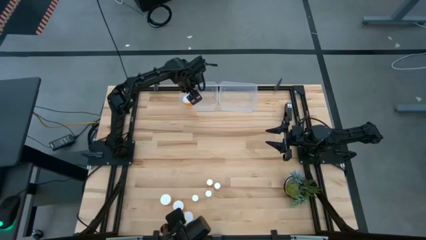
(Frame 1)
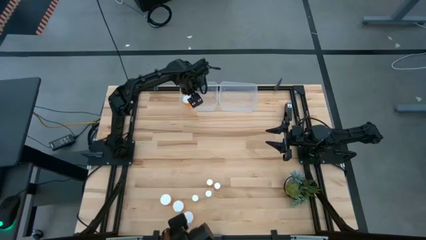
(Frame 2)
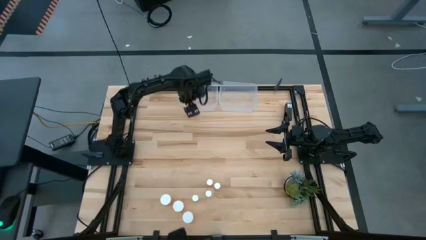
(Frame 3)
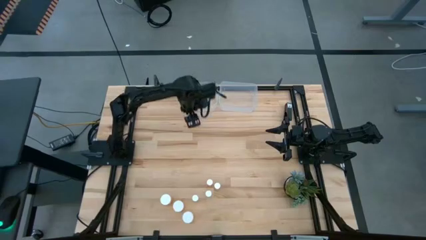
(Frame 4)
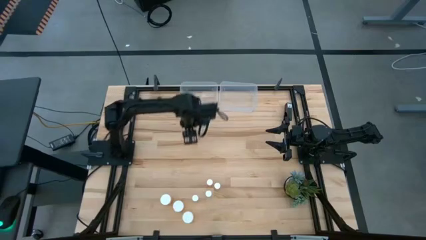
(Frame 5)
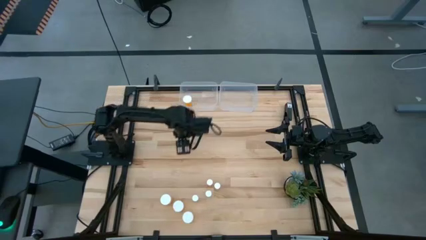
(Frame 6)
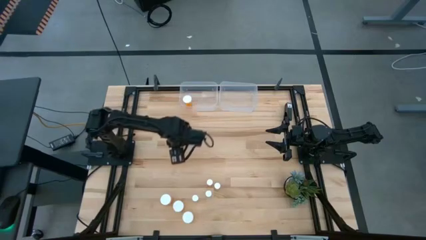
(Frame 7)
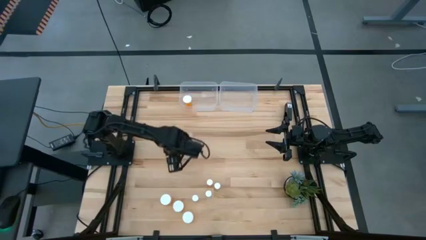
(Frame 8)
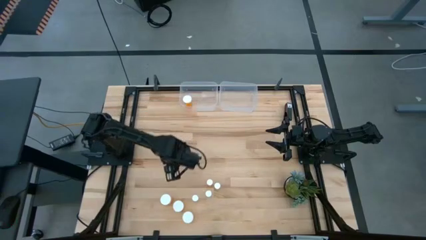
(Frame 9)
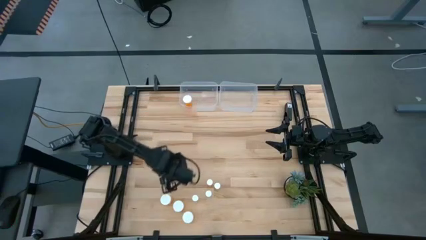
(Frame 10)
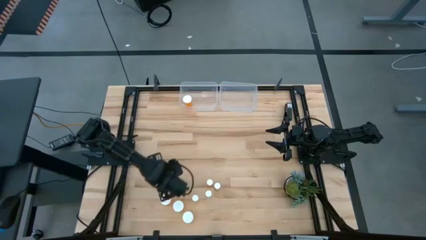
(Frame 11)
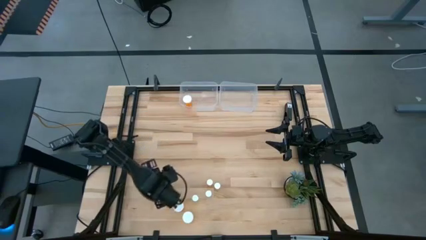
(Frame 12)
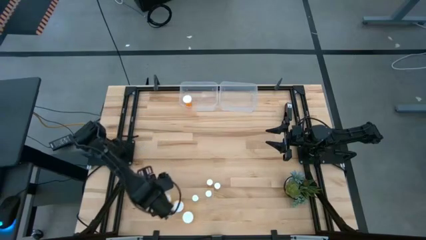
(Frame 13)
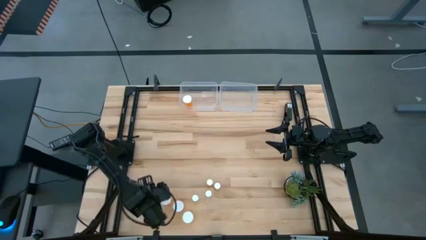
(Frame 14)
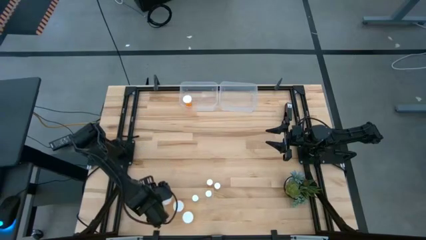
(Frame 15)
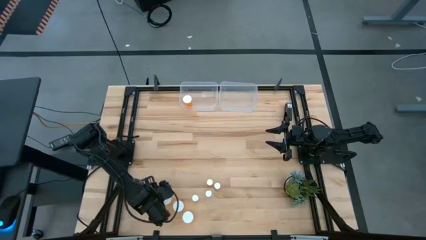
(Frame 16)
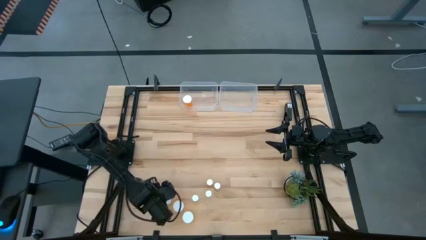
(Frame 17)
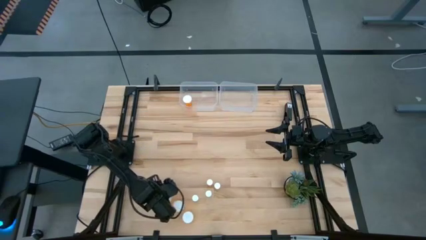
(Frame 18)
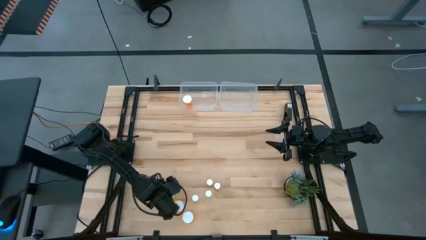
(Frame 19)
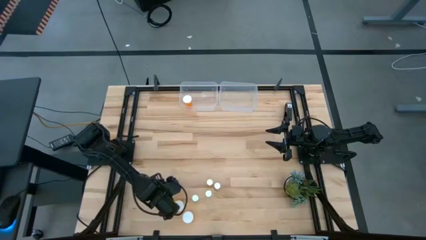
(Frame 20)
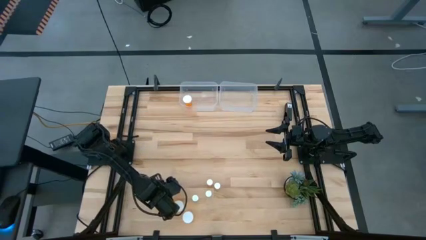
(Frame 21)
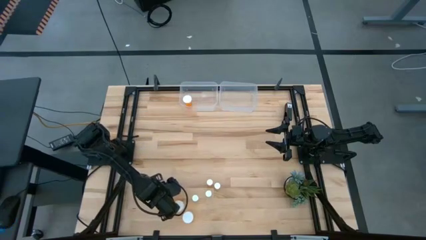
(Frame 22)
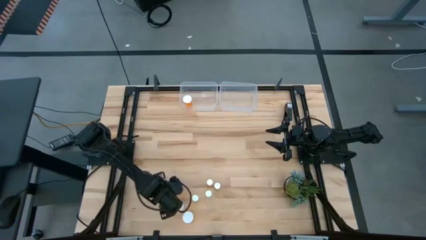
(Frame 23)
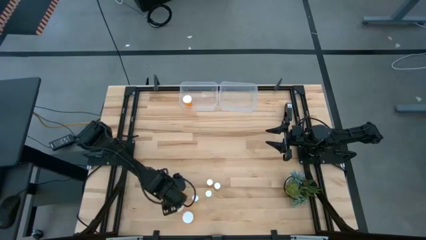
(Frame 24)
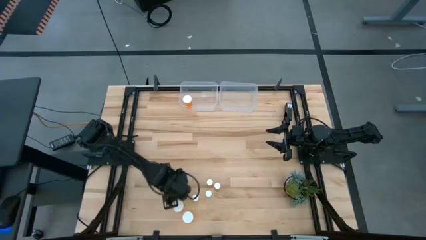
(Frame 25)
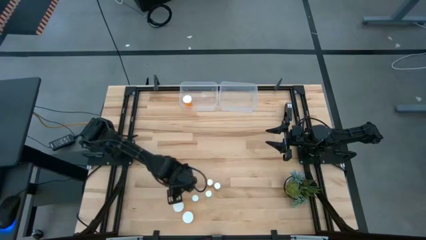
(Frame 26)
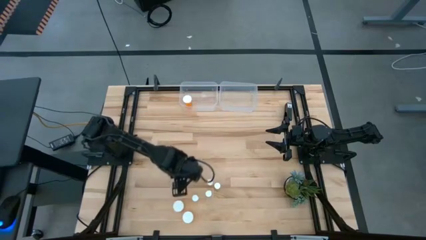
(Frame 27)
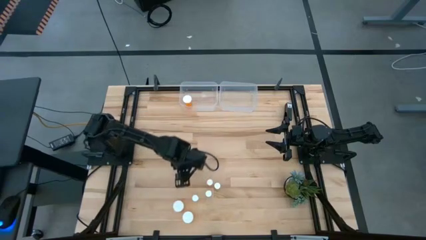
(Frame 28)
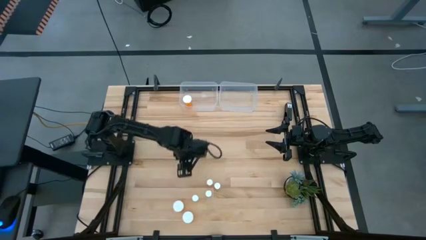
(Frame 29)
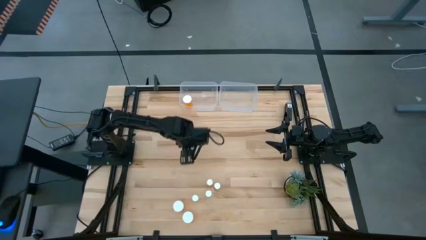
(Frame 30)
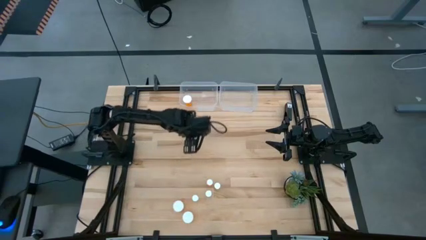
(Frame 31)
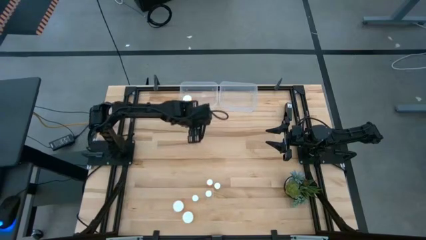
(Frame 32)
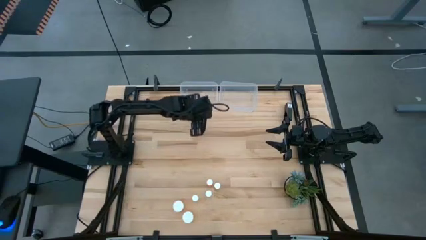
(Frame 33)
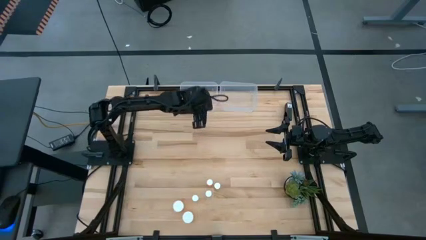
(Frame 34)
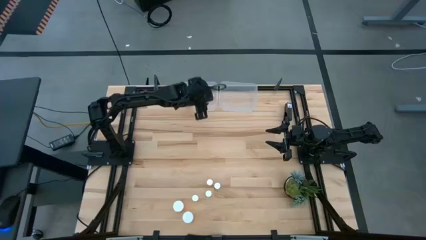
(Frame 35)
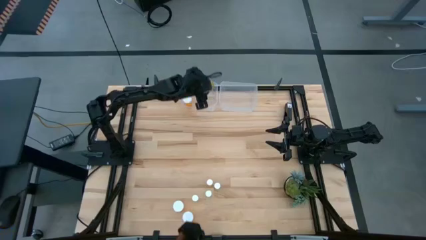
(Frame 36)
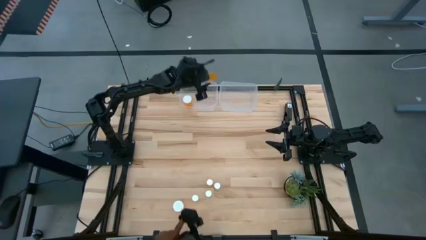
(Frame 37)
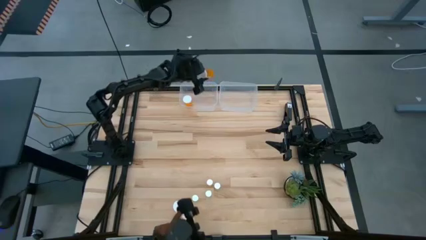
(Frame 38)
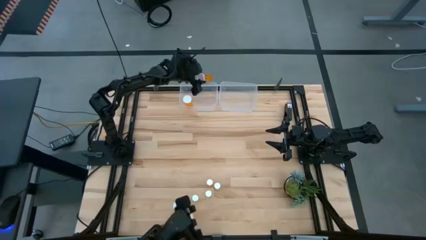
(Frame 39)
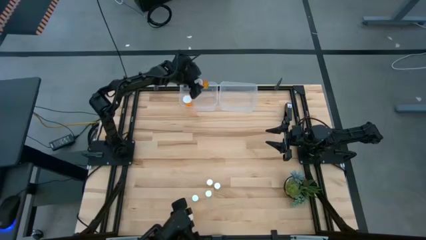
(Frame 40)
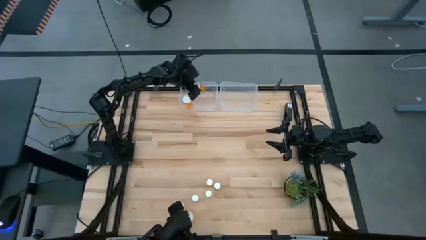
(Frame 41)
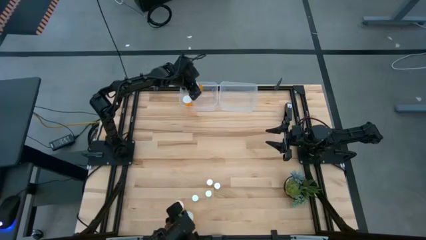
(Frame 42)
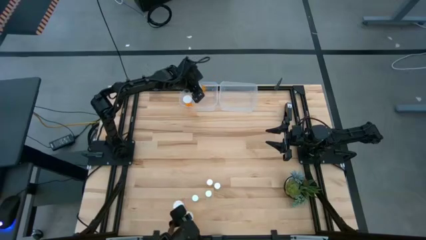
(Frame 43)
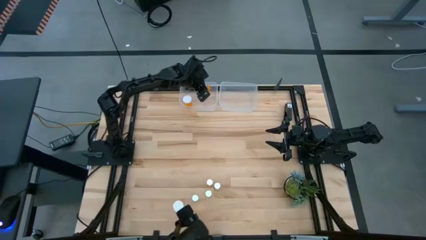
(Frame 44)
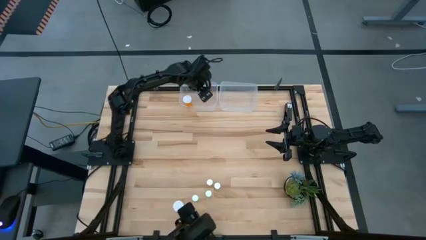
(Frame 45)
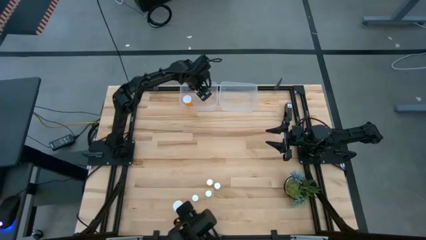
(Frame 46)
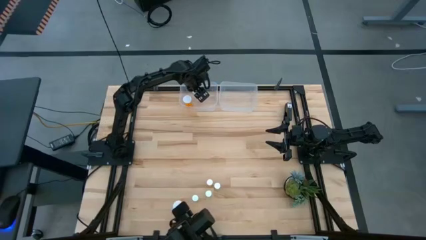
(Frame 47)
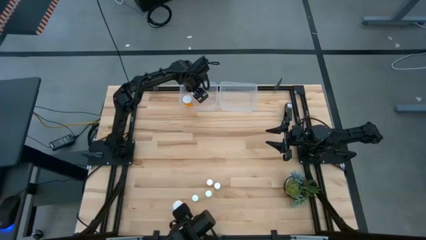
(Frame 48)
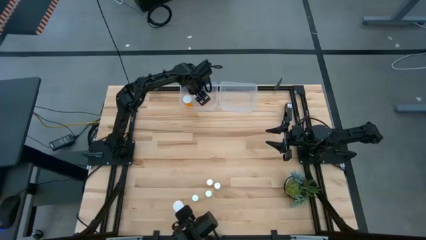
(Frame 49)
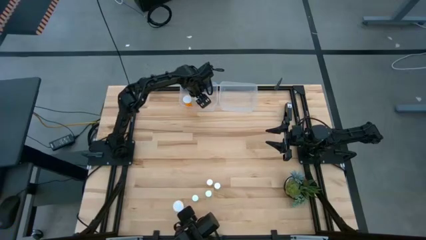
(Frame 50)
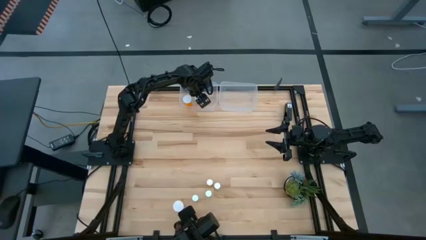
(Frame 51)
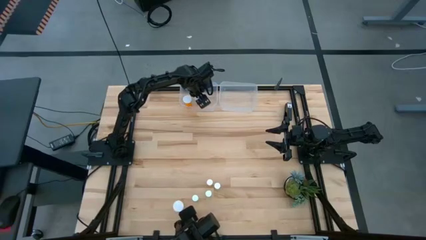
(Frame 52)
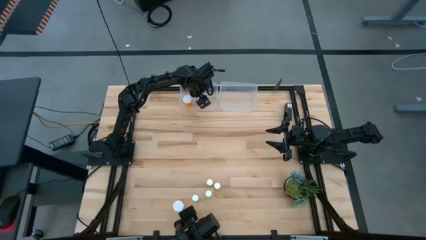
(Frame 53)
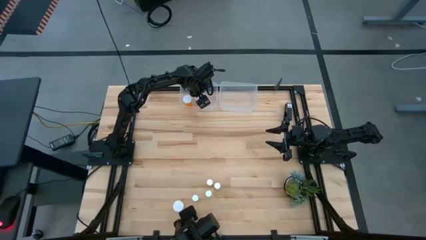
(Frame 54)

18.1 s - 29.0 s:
Task: Pick and place medicine bottles into bin by pill shape (circle, oval)
Put the large orange pill bottle into the left transparent bin

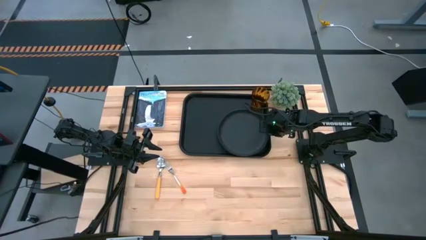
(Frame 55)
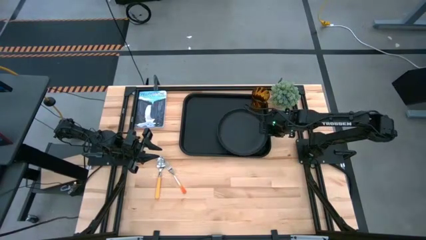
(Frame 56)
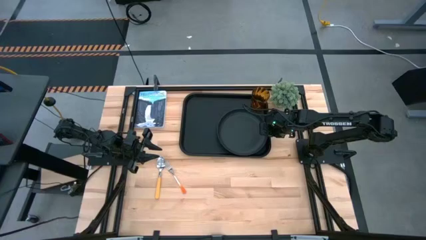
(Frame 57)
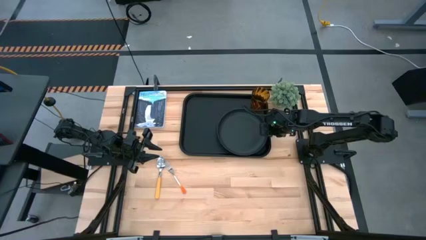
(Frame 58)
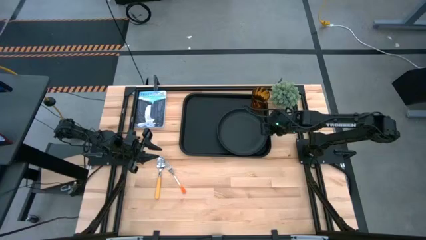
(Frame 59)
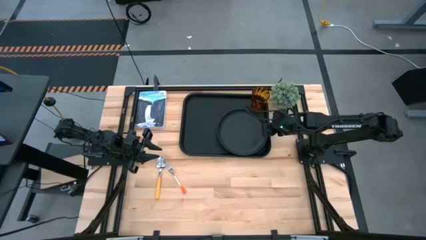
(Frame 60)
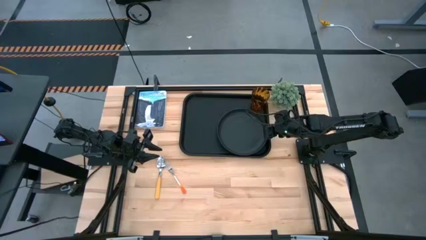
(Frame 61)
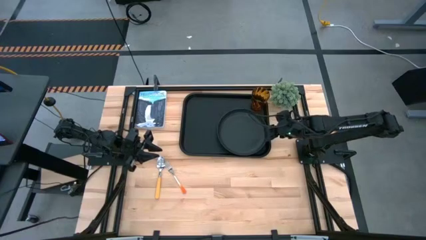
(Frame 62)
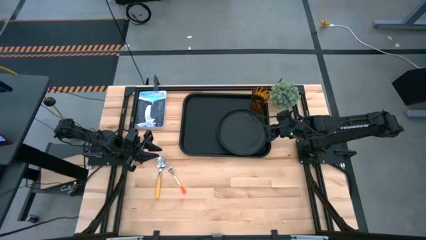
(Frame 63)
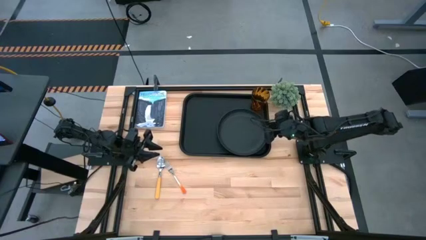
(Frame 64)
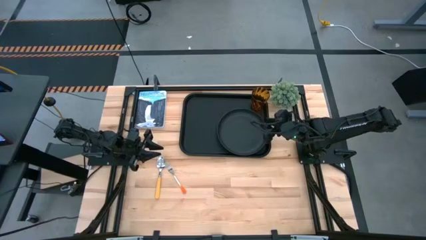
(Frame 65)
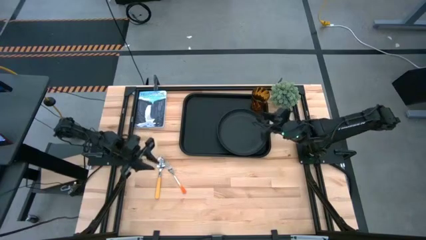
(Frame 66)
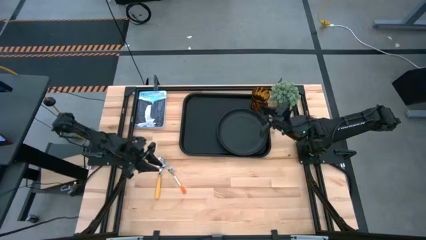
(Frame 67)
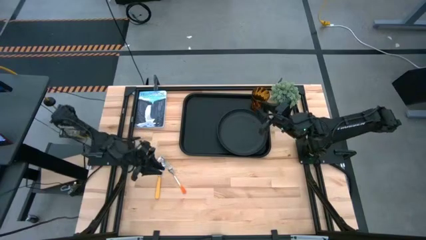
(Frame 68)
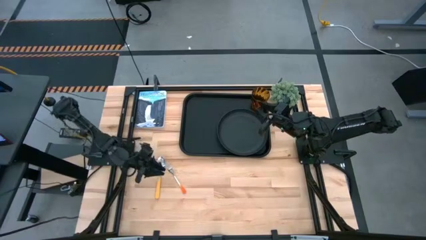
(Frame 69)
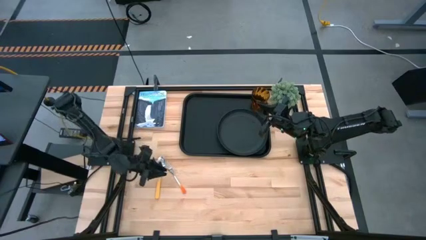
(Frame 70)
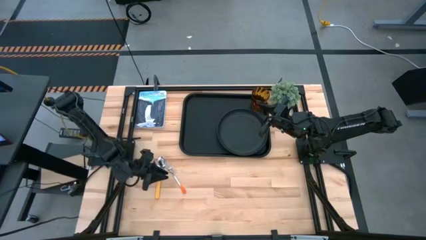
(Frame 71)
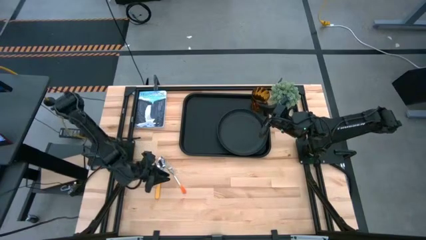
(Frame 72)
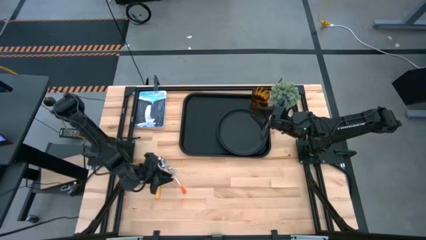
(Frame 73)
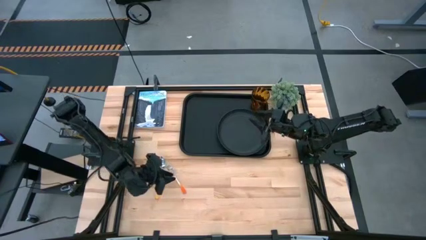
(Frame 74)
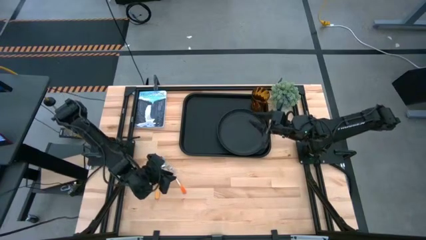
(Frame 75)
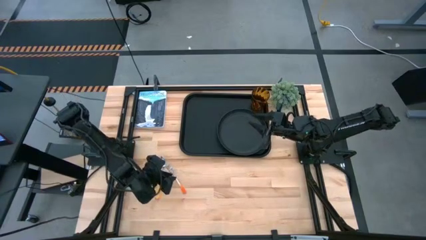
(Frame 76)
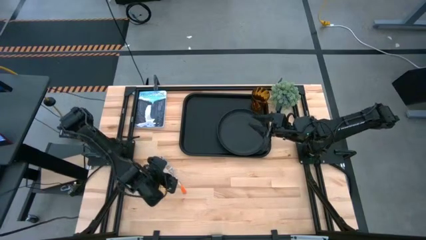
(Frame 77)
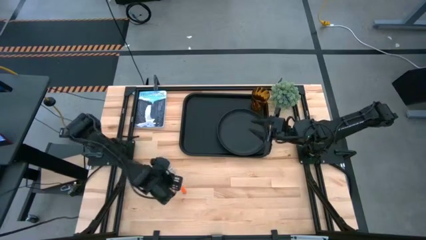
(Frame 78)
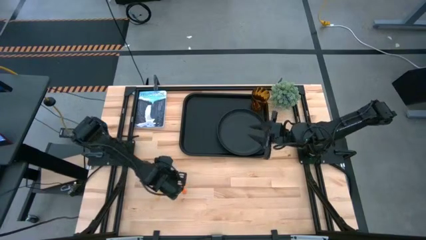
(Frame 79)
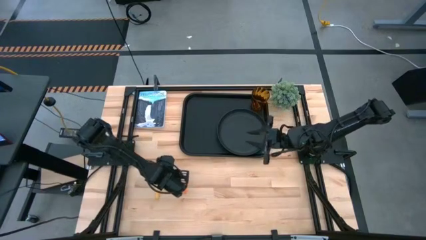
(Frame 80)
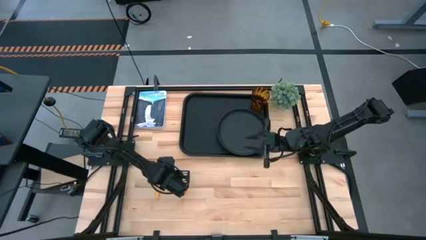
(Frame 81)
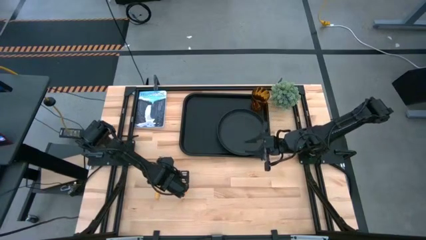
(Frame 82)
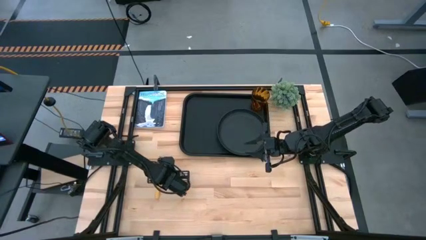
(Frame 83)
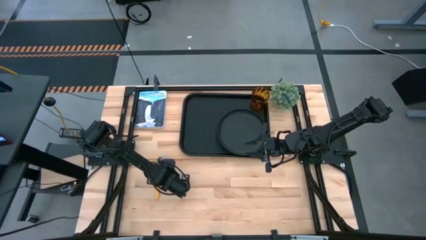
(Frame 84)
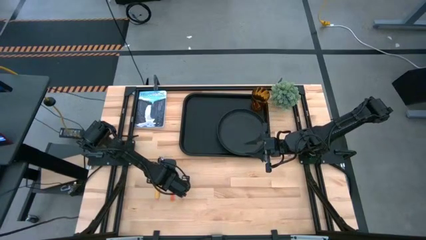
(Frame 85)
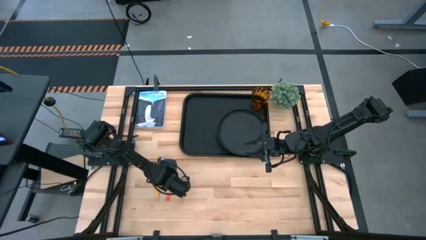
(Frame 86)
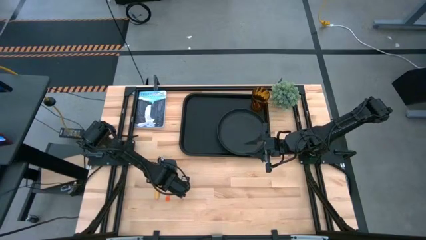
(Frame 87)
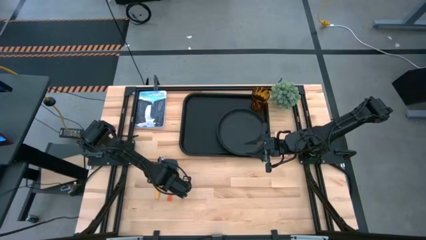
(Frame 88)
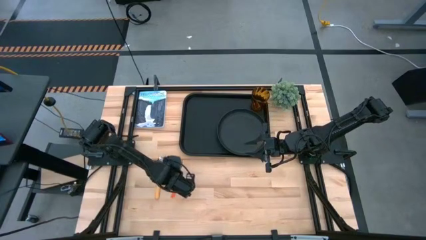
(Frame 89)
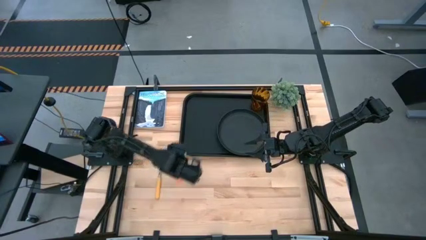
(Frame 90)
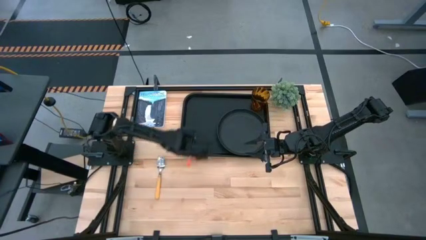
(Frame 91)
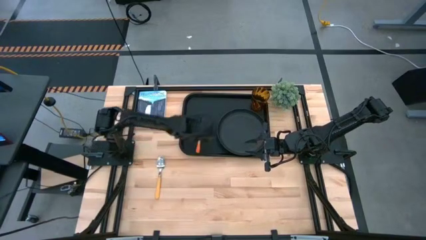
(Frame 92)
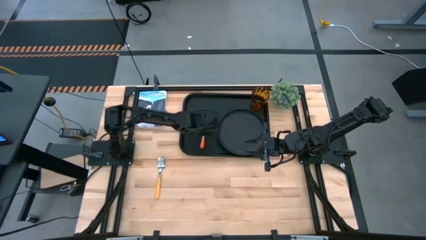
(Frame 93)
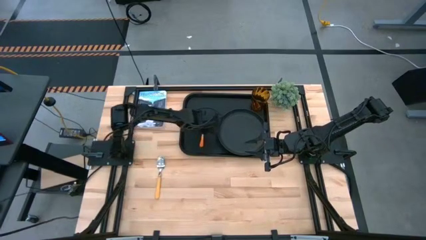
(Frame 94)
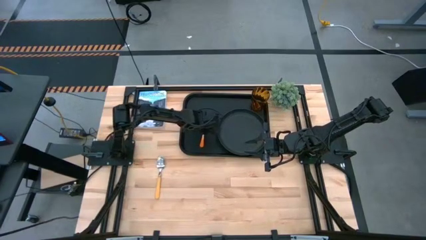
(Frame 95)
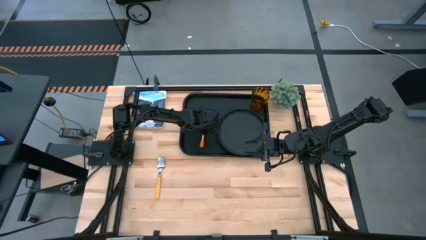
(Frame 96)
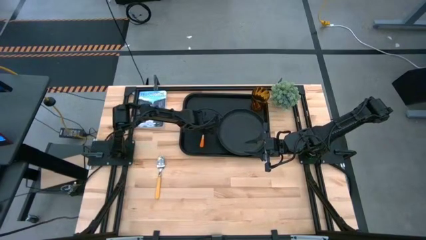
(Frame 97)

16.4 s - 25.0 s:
Task: Pick and place plate/cup/fork/spoon on tray
Put the orange fork on the black tray at the left side of the black plate
